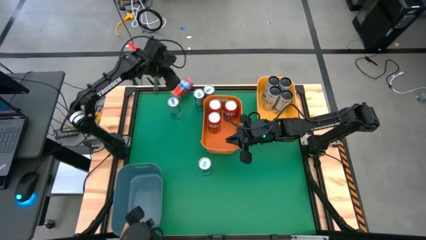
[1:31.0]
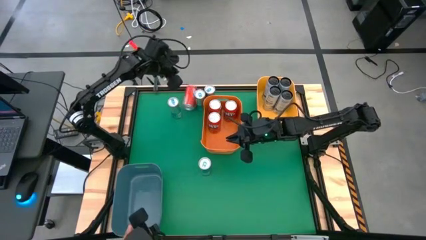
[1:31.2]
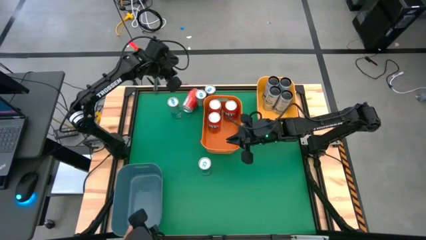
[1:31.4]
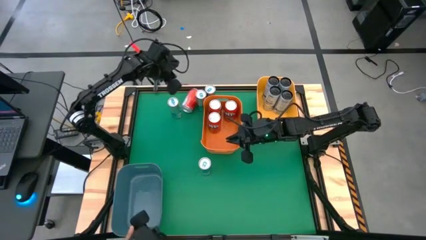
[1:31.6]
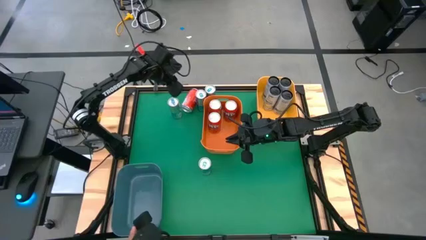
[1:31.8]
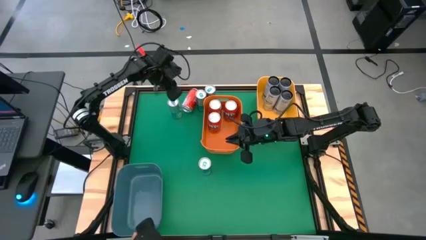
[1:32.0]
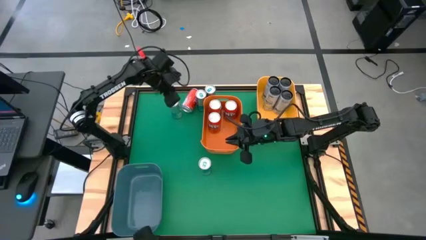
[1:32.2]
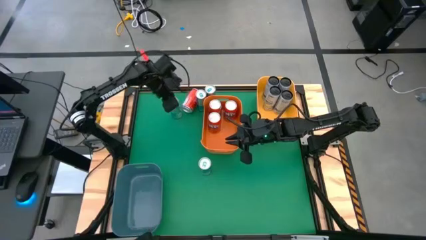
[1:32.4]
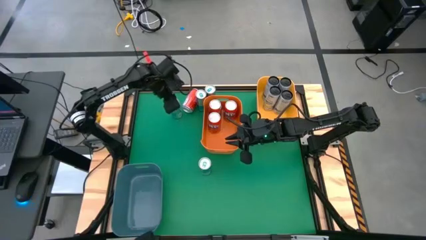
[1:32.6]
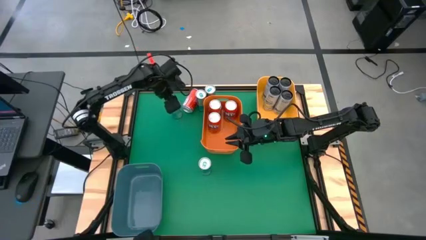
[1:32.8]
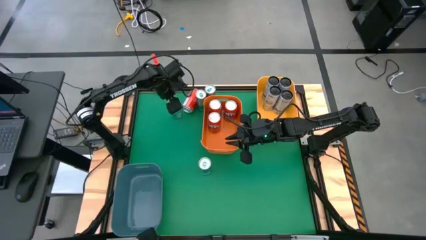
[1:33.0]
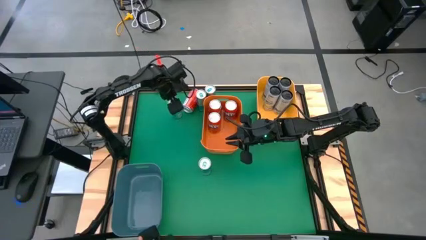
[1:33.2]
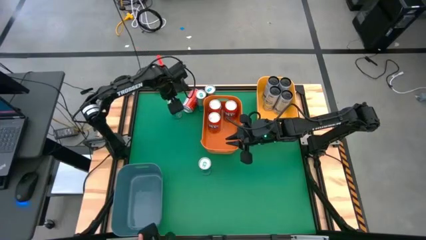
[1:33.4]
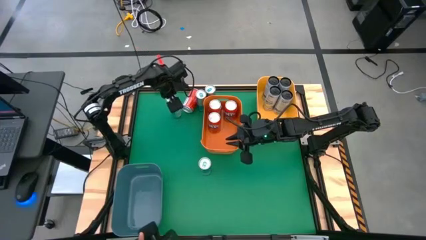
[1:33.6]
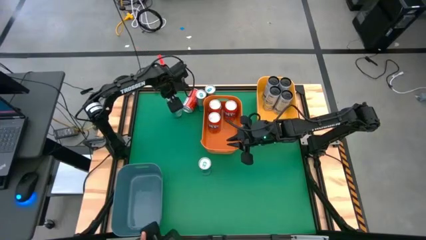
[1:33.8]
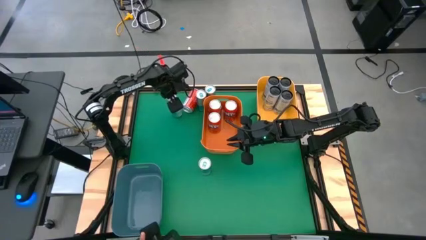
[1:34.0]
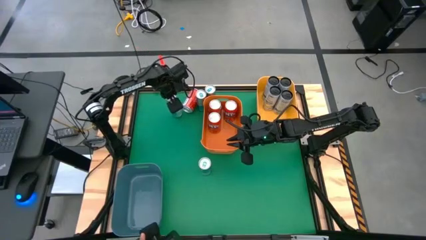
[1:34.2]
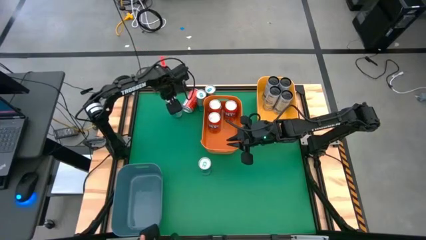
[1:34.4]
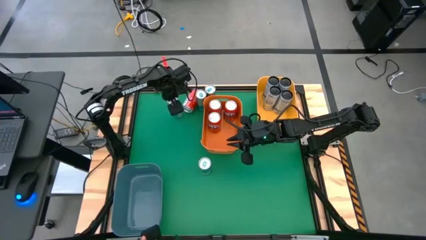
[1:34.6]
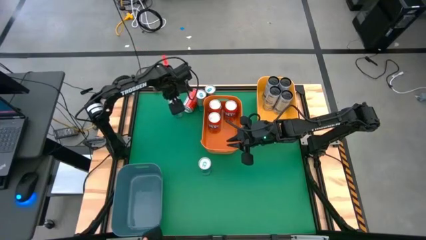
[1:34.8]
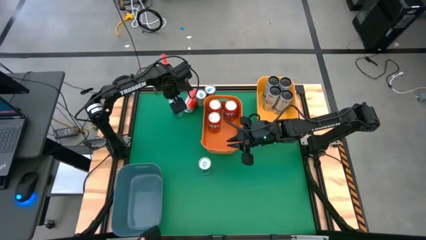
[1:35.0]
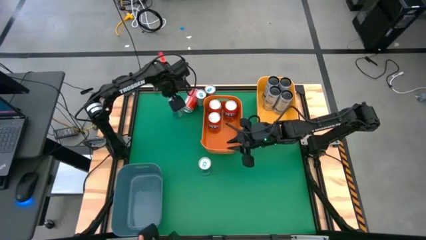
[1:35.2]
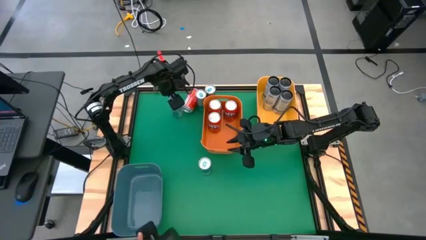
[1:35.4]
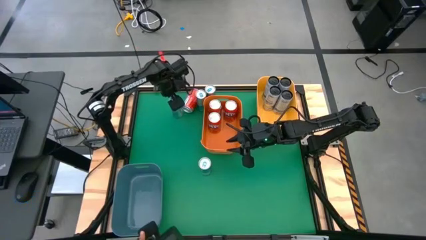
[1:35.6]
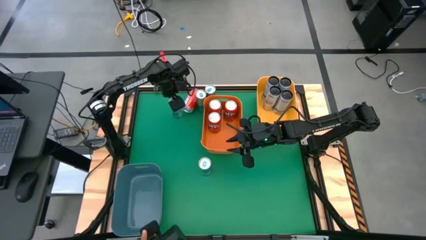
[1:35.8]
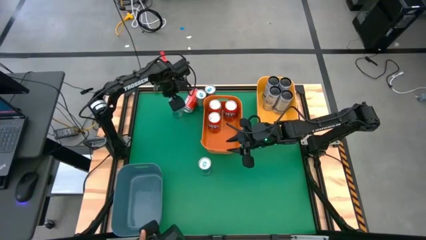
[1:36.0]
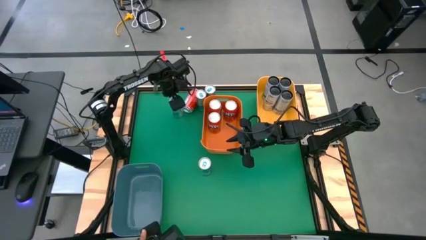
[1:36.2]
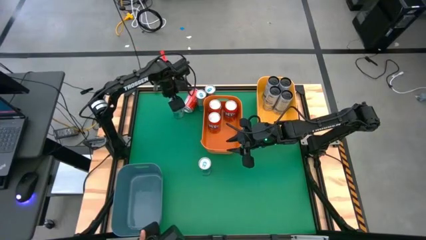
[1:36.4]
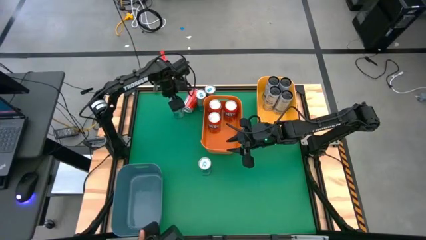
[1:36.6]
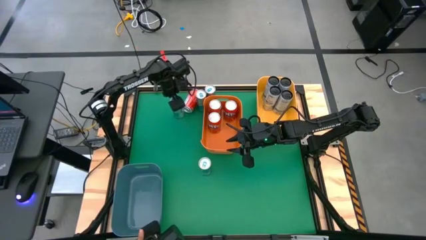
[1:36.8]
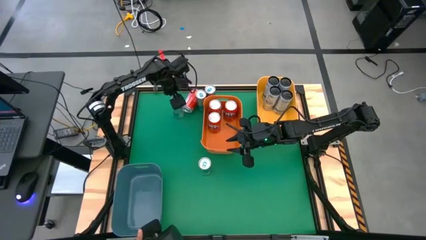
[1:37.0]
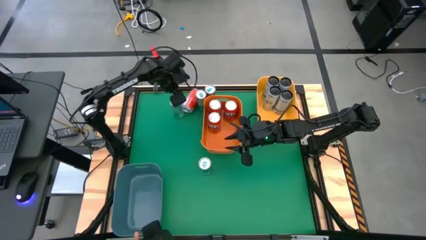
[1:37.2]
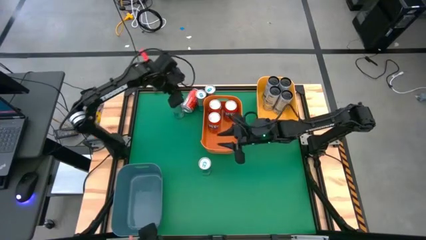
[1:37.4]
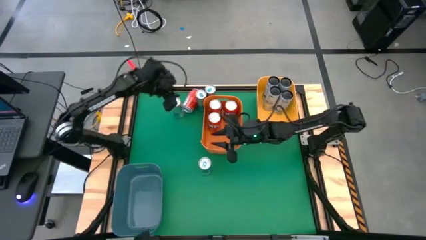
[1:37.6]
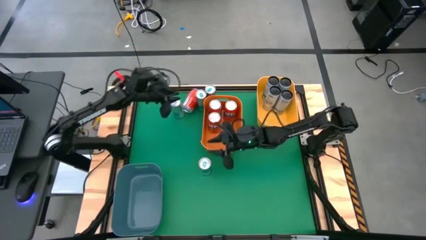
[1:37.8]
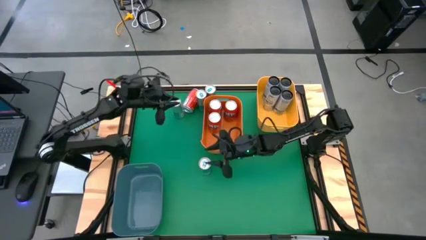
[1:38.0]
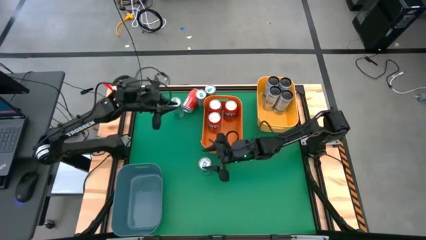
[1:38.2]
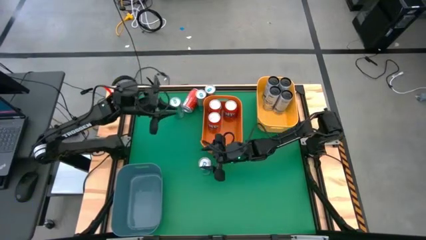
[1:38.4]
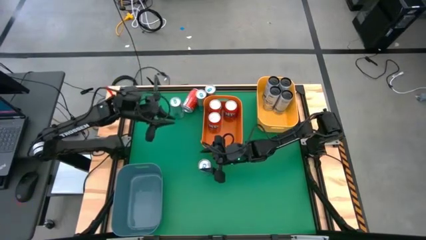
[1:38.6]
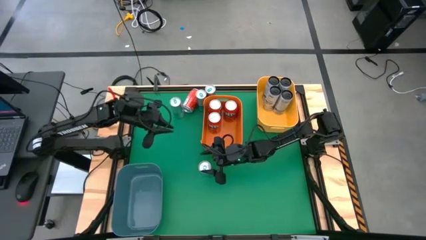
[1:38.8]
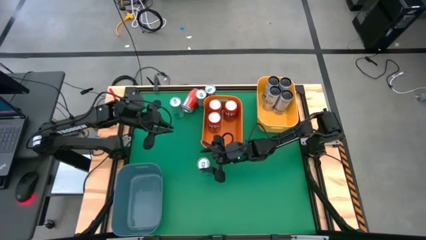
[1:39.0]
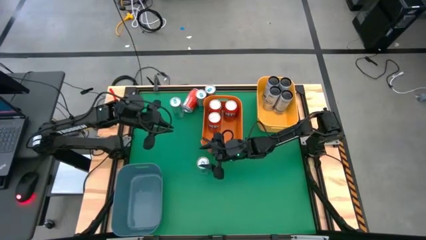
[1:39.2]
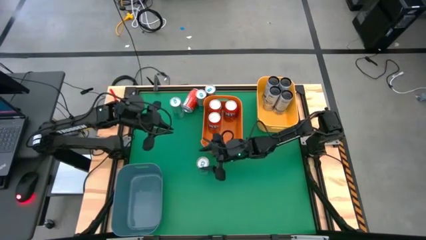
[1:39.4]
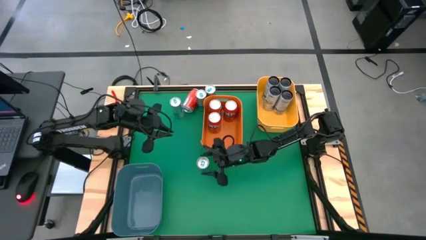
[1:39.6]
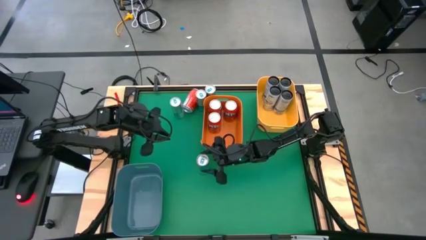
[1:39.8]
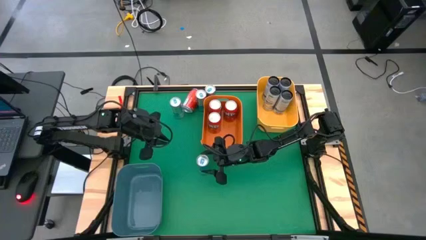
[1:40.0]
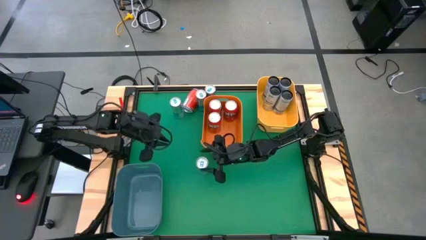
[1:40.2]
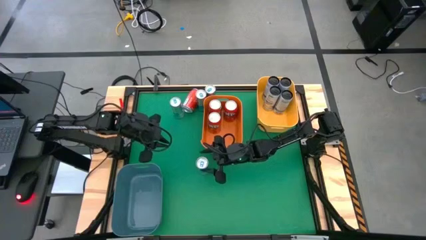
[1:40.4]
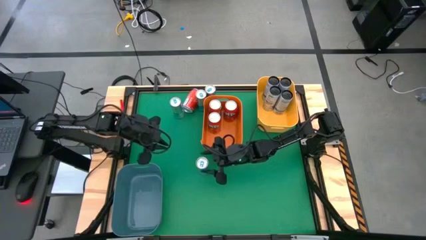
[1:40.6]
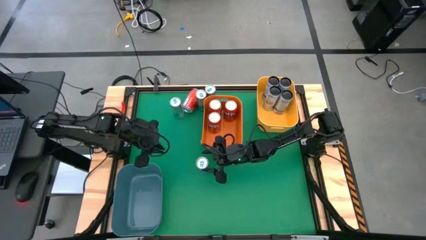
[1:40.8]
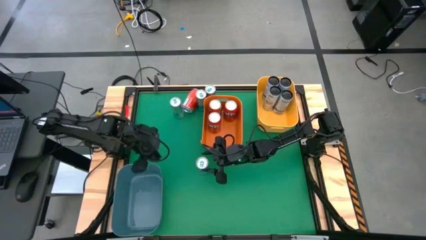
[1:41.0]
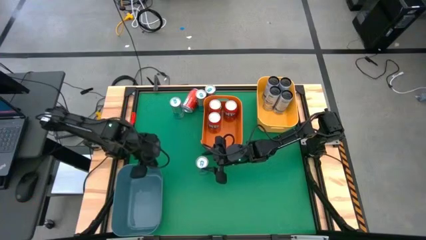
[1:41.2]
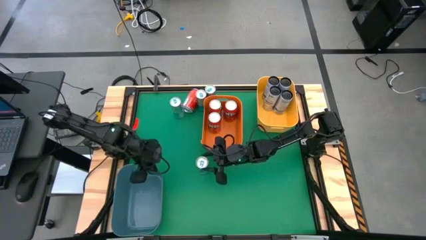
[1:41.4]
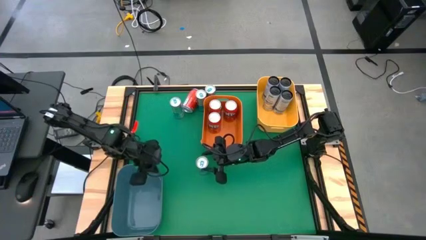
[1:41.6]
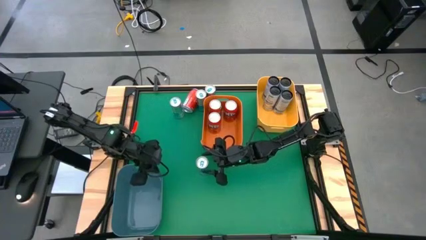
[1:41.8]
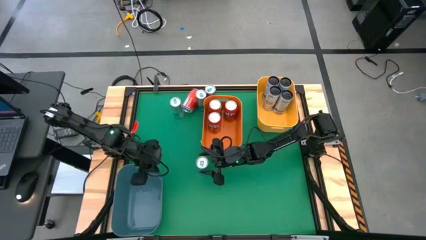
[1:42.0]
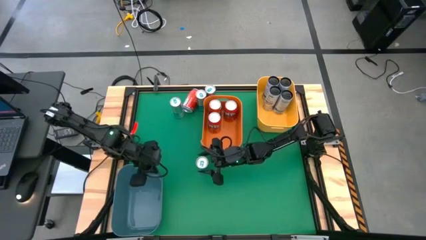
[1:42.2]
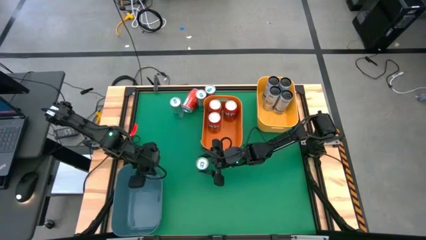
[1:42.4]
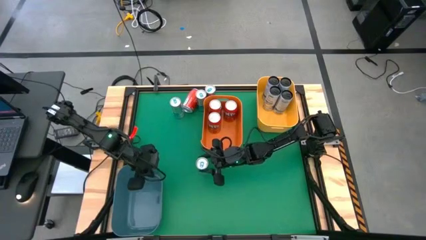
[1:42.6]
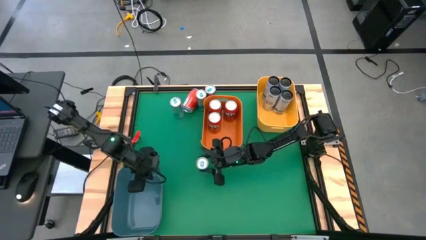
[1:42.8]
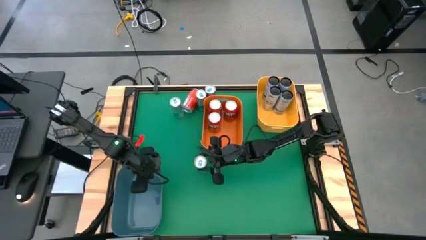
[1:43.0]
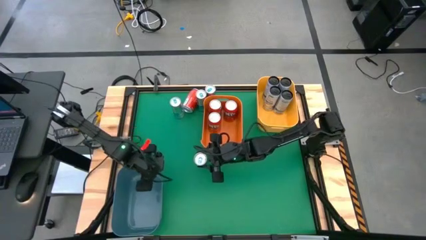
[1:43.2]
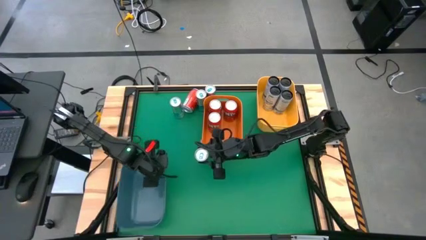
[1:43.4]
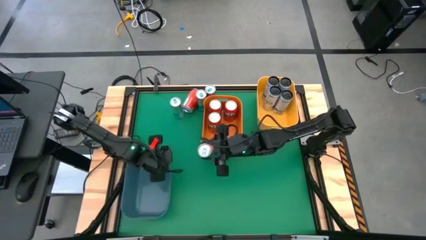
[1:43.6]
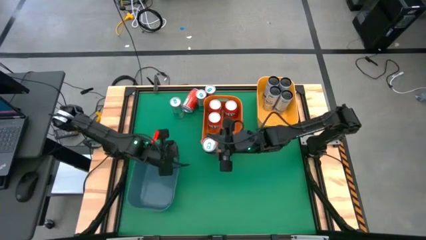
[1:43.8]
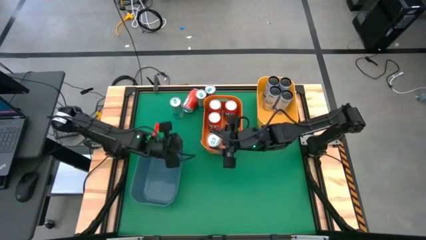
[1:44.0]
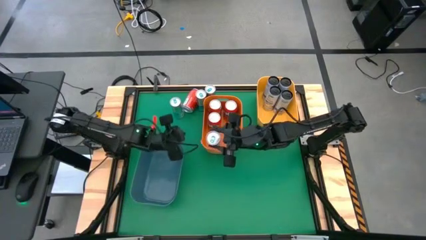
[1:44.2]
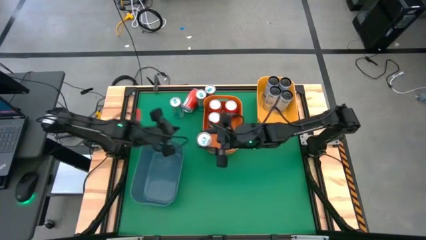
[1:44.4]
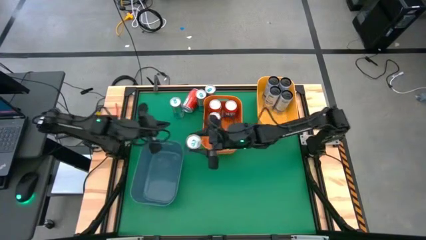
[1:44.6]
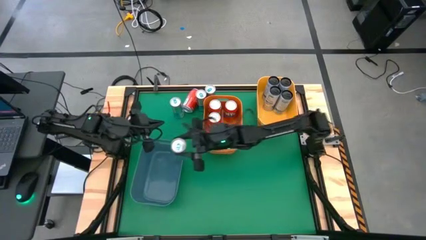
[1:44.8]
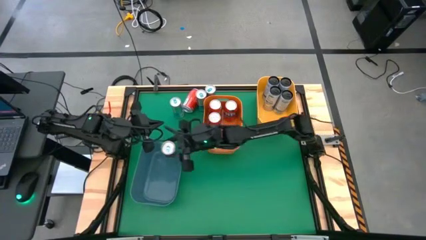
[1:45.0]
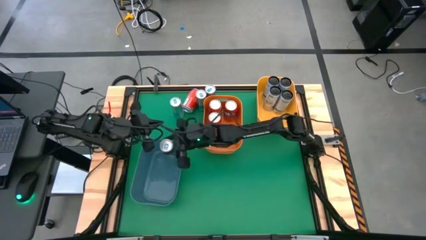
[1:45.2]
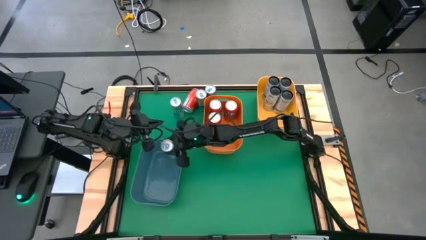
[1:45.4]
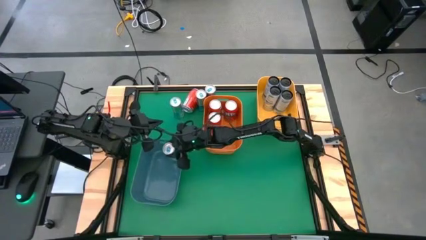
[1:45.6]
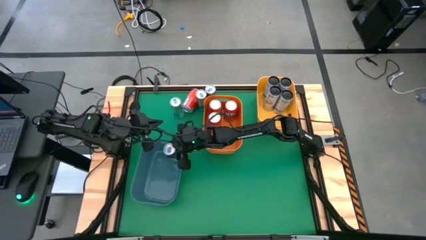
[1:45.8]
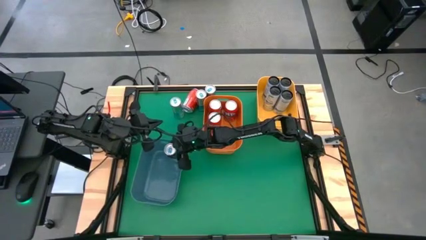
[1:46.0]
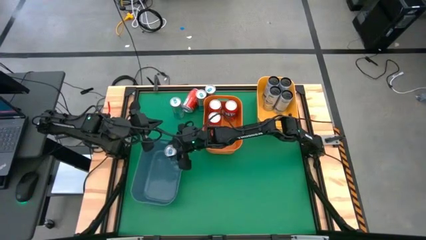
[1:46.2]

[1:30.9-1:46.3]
Task: Sort soda cans
Put the blue soda can into the blue bin
